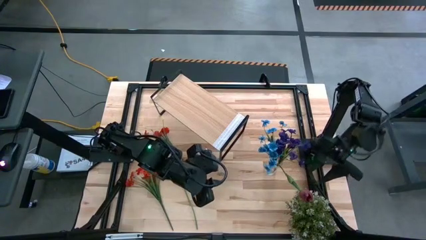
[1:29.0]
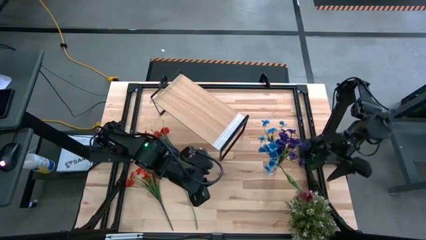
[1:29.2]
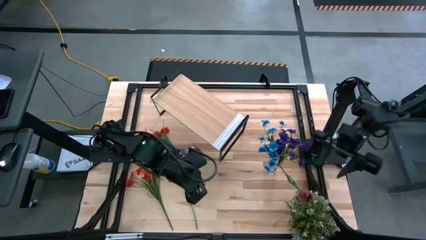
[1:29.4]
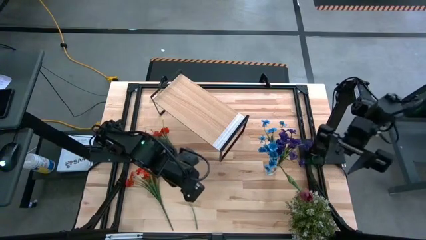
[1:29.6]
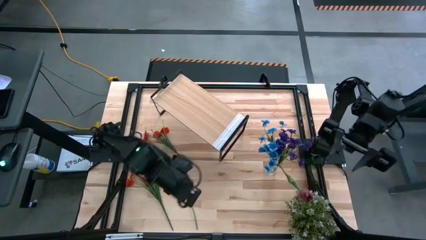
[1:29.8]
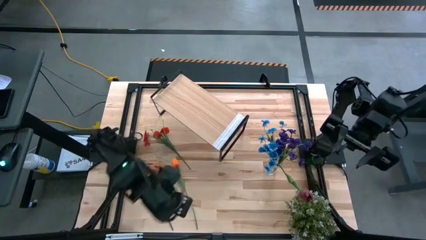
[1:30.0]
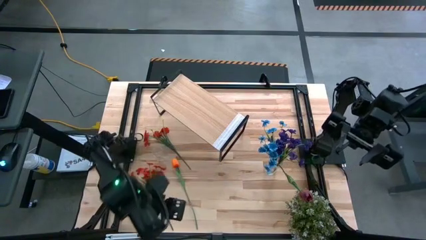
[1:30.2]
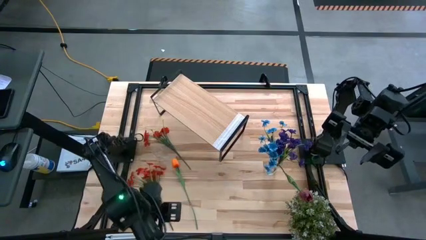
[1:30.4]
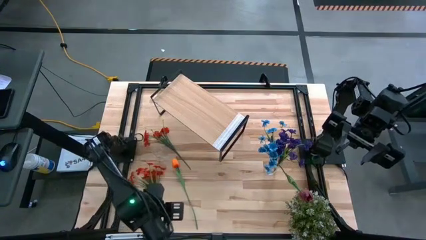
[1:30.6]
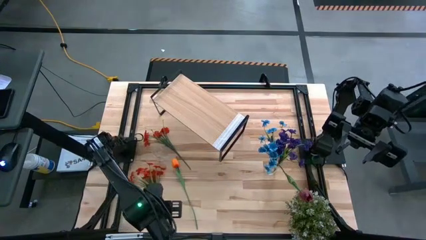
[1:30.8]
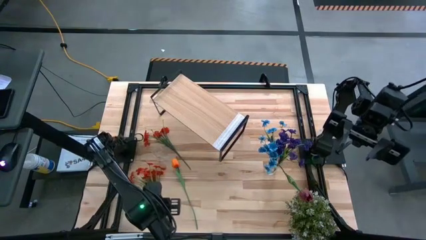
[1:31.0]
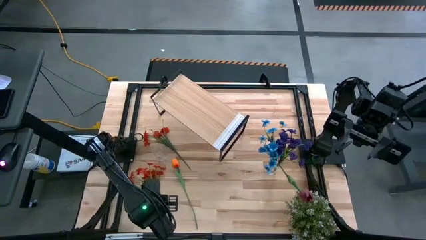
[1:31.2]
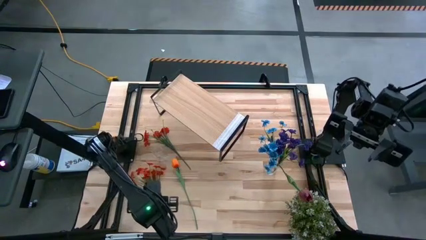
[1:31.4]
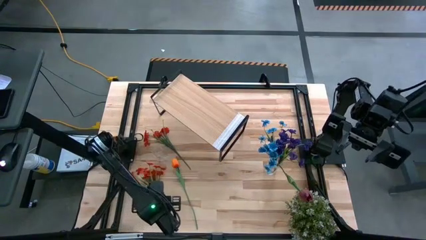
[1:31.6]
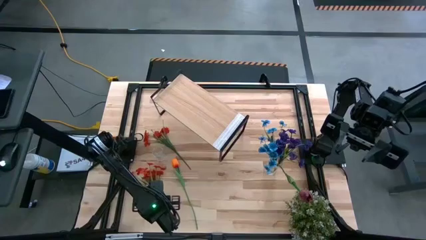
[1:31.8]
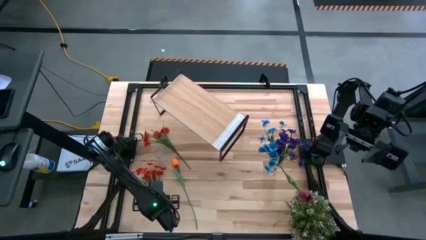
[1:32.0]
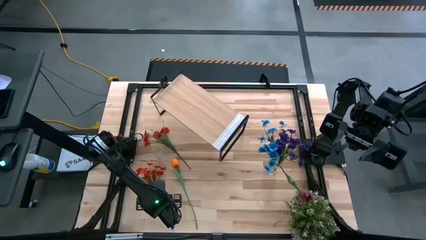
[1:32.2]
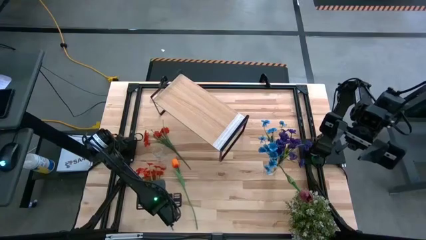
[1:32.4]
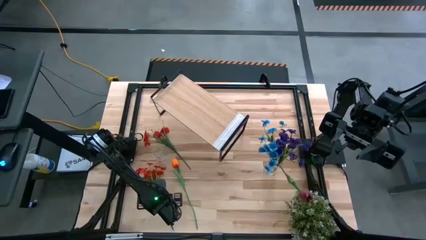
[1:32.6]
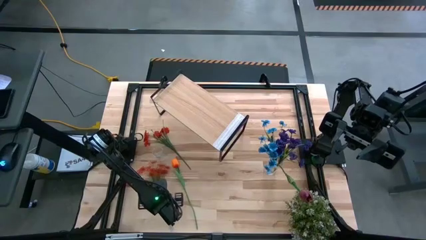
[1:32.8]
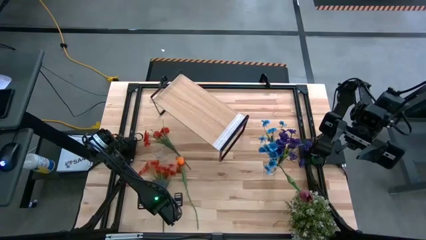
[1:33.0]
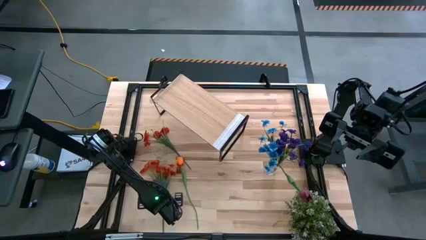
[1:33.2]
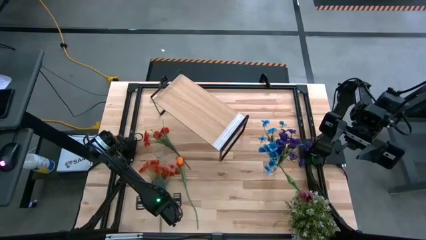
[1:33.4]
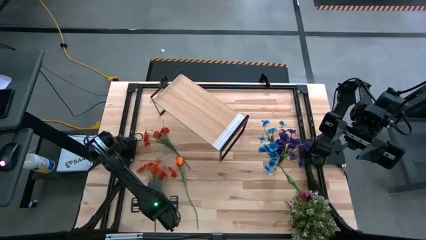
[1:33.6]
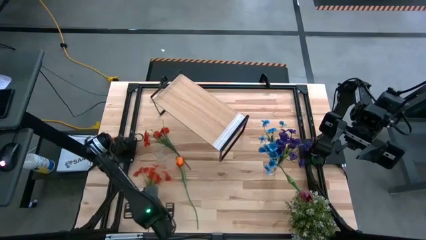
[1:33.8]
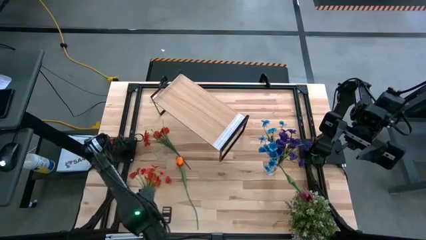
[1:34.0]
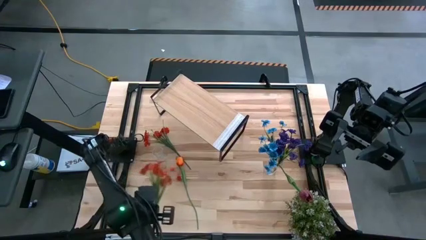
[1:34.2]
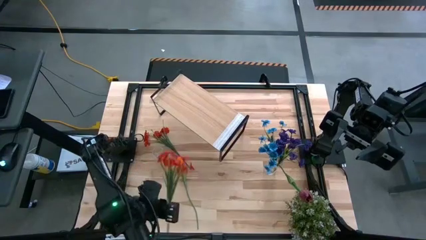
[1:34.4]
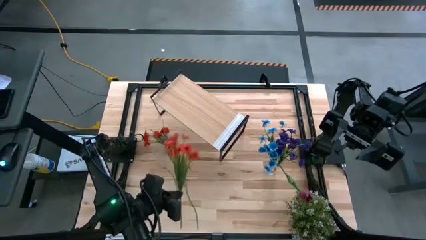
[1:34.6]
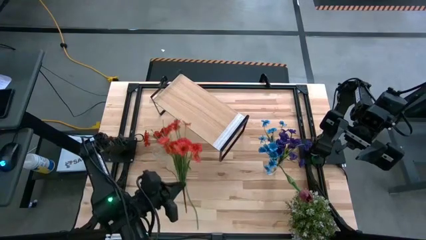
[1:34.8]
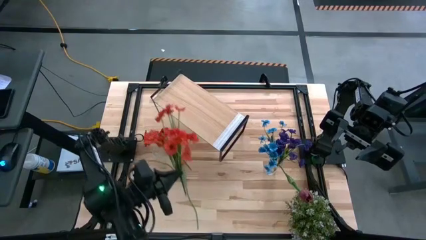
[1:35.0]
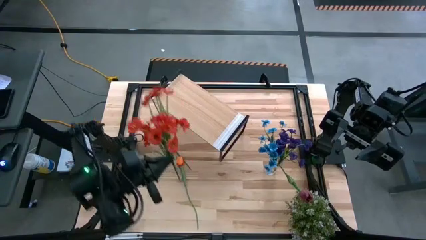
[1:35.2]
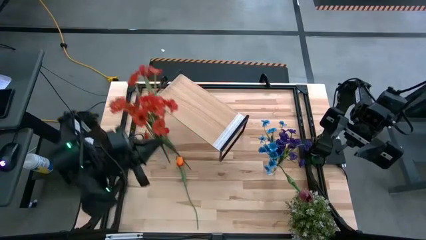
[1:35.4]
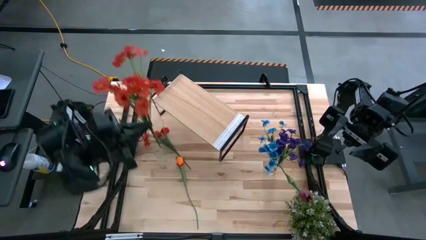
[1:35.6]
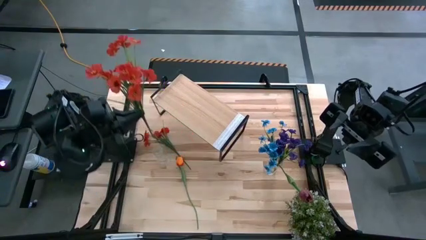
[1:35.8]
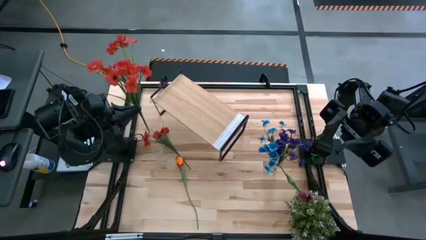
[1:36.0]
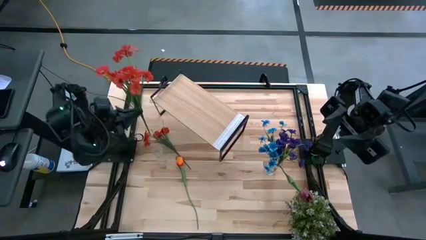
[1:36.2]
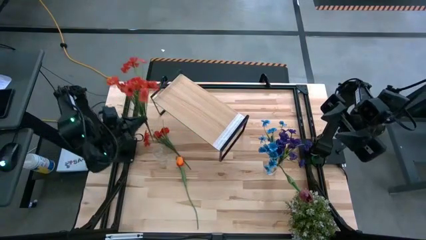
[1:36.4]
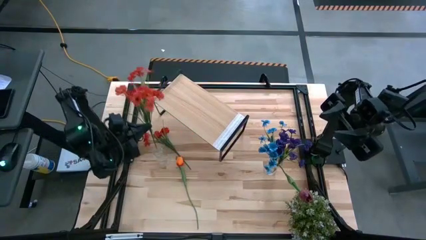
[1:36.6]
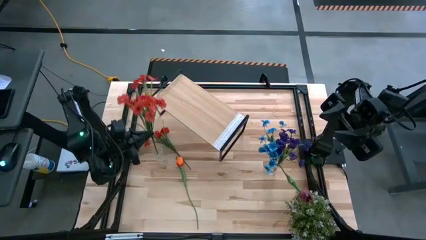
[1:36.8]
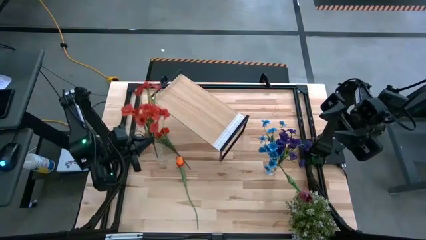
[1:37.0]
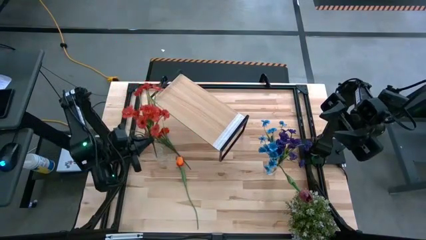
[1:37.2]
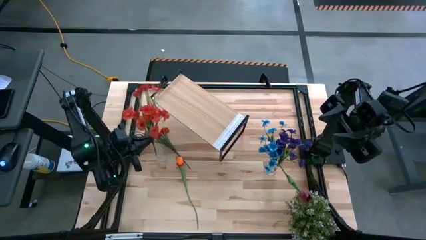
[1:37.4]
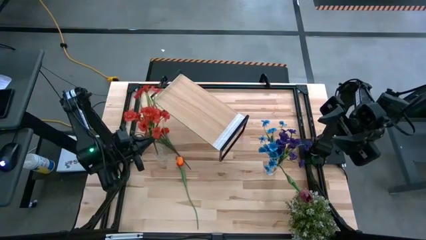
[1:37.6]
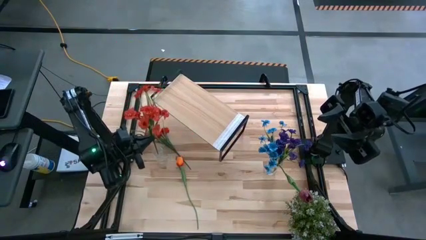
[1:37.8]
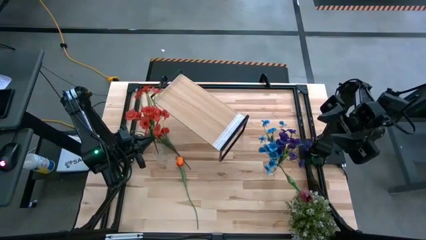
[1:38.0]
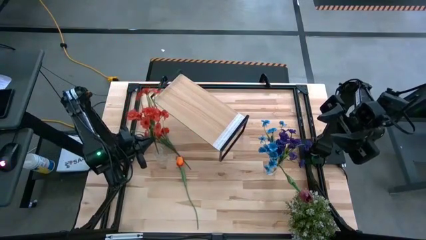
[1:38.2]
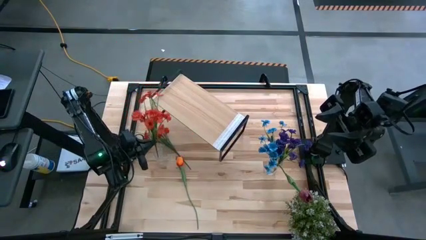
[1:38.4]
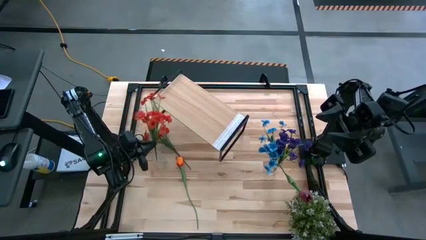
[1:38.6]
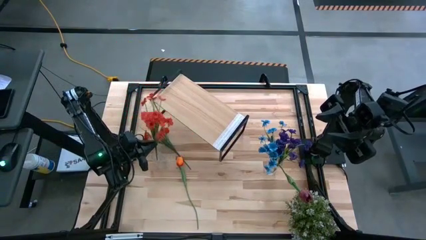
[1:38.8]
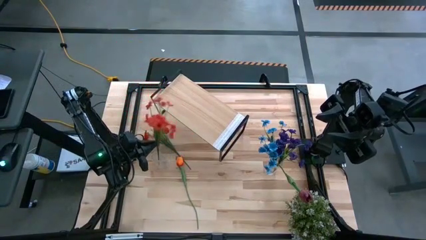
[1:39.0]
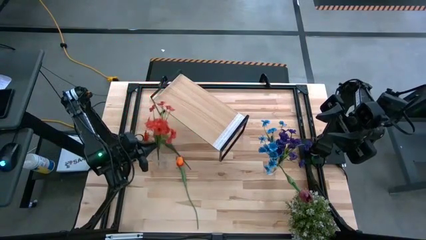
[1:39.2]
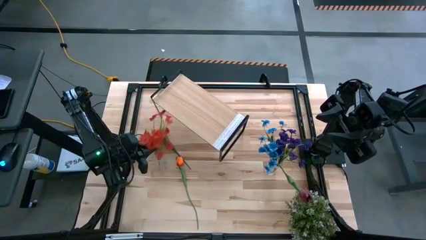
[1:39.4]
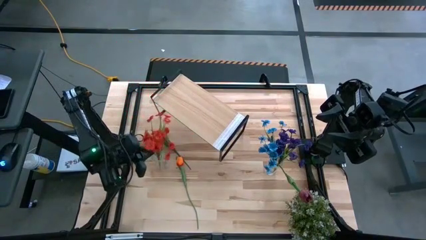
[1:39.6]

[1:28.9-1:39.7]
Task: Pick and place flowers into a vace then onto a shelf
Put the bottom red flower into the left transparent vase

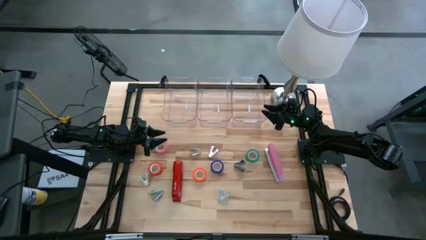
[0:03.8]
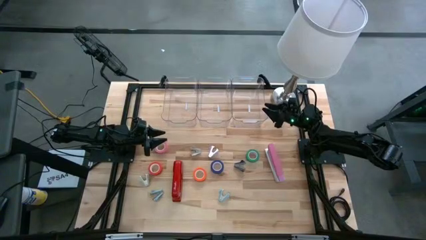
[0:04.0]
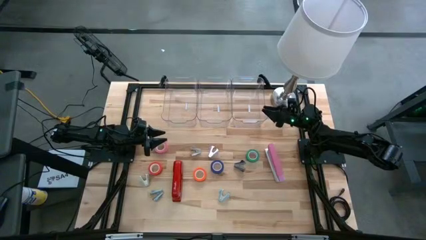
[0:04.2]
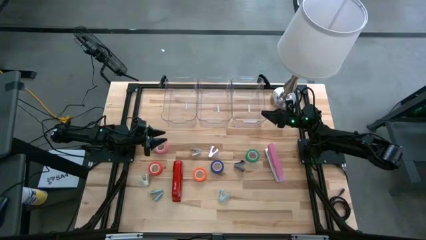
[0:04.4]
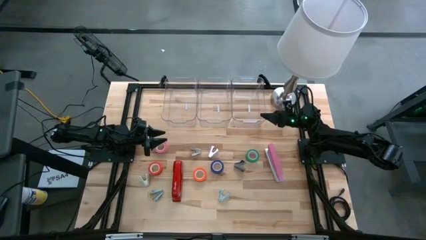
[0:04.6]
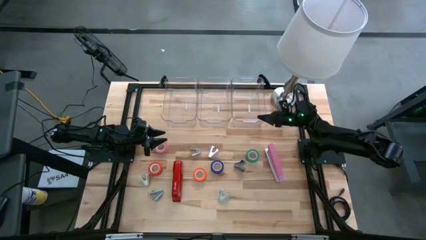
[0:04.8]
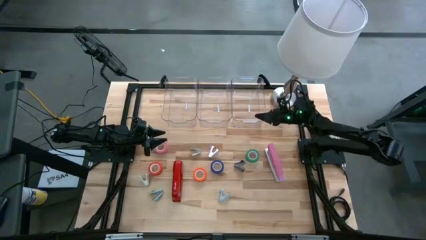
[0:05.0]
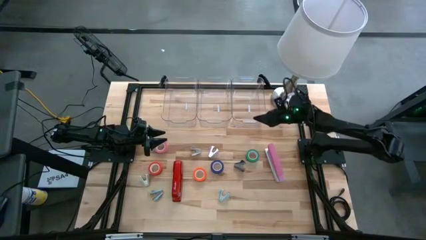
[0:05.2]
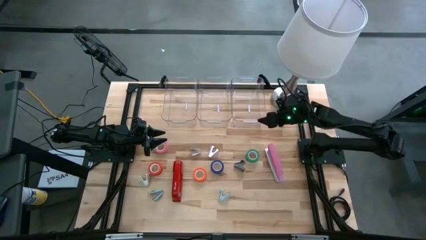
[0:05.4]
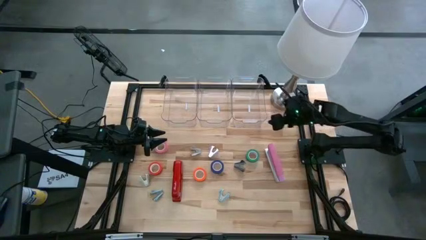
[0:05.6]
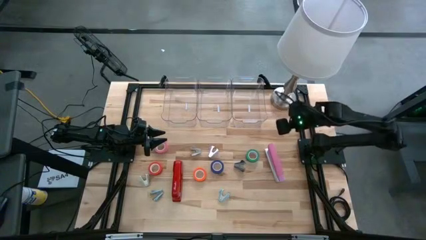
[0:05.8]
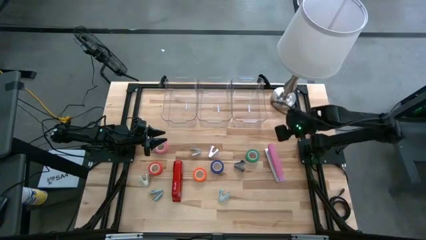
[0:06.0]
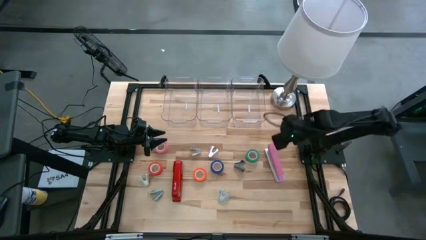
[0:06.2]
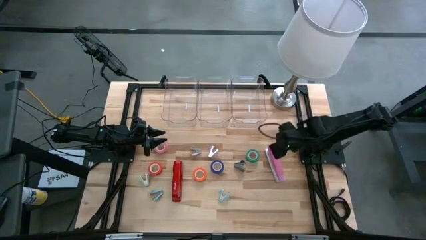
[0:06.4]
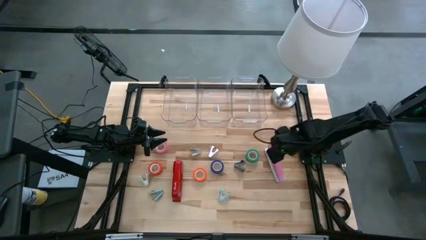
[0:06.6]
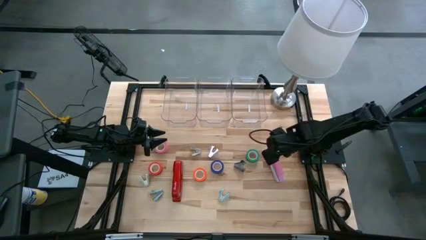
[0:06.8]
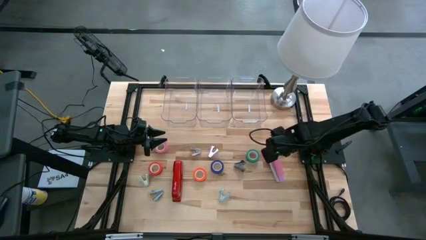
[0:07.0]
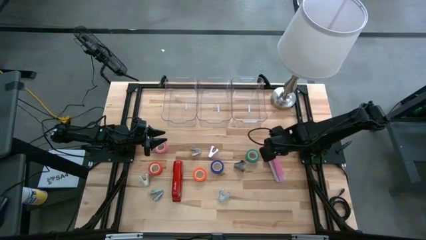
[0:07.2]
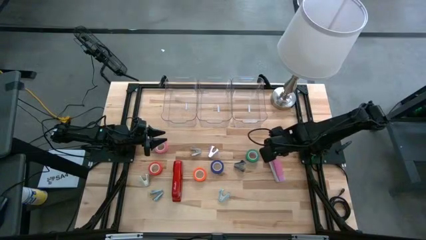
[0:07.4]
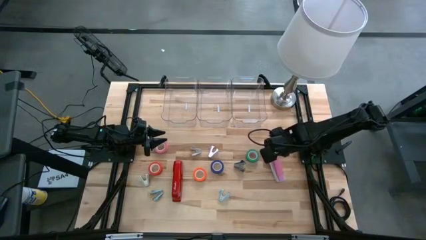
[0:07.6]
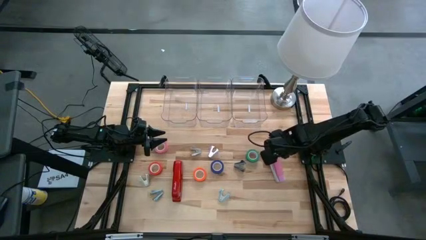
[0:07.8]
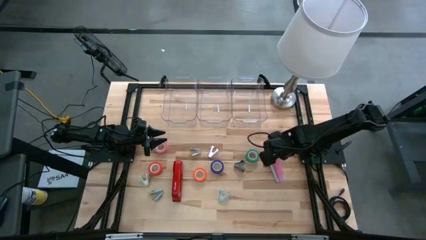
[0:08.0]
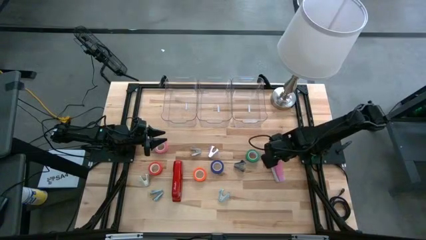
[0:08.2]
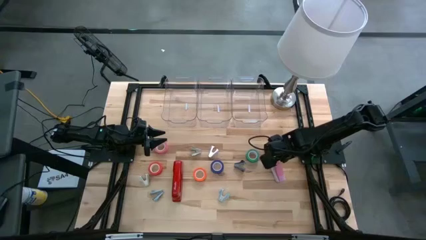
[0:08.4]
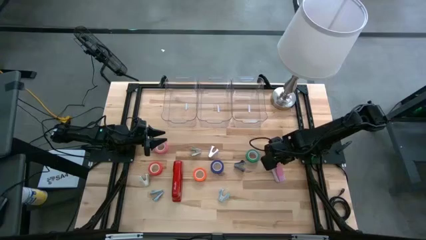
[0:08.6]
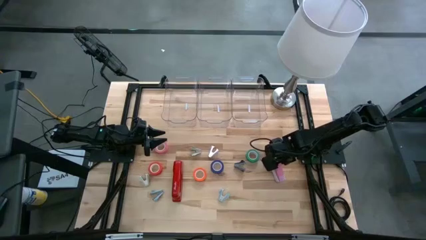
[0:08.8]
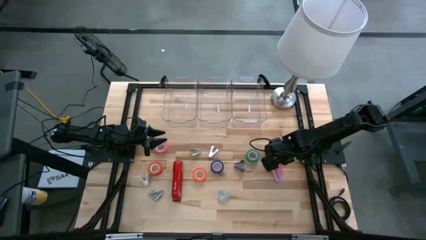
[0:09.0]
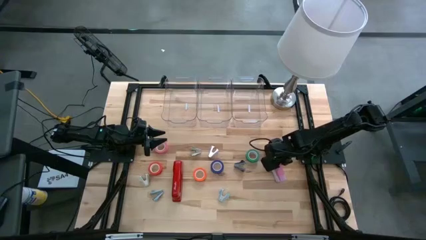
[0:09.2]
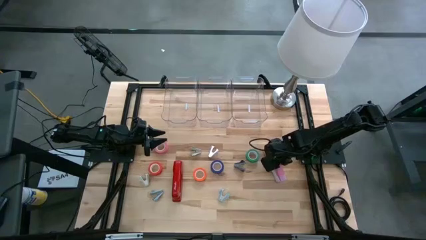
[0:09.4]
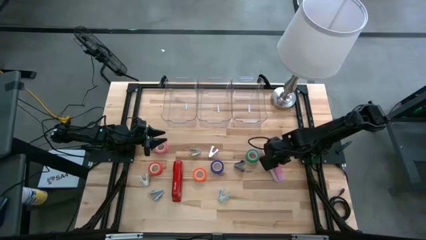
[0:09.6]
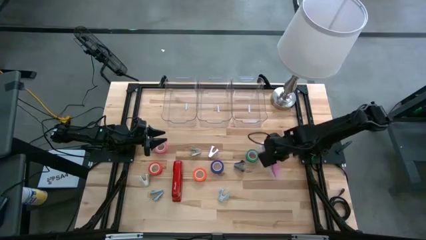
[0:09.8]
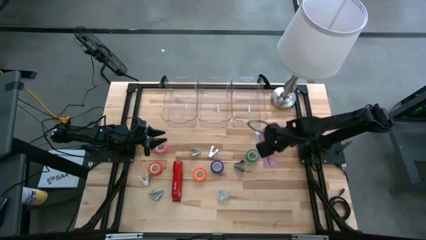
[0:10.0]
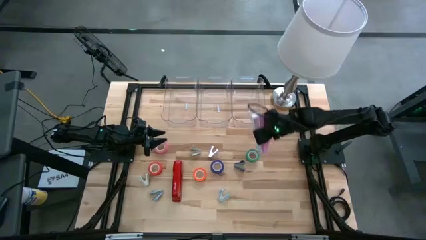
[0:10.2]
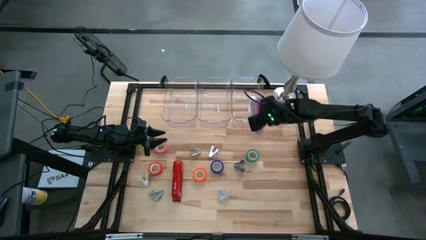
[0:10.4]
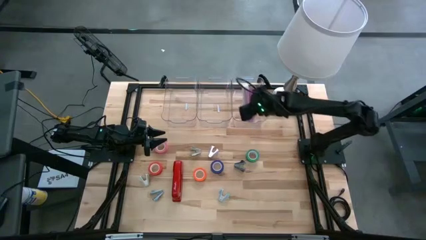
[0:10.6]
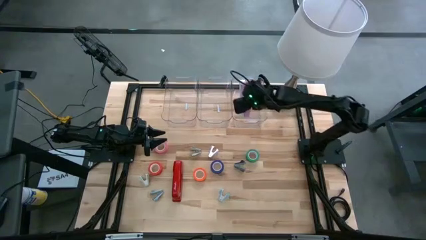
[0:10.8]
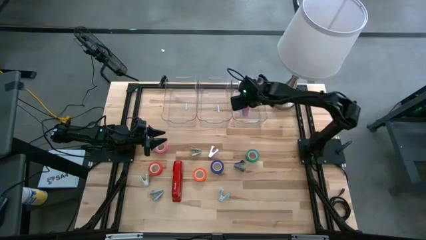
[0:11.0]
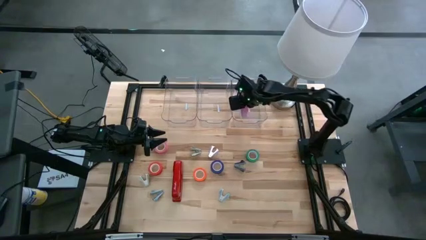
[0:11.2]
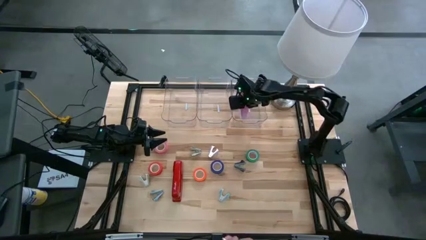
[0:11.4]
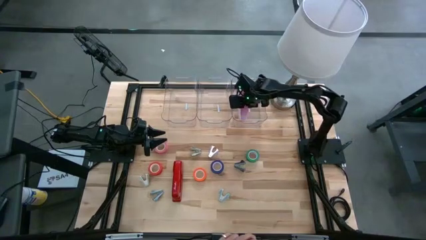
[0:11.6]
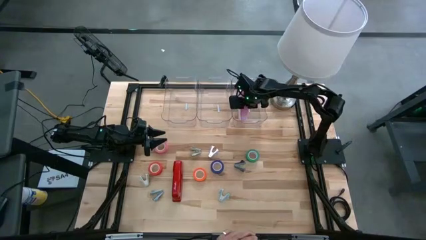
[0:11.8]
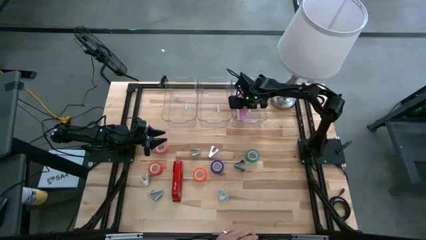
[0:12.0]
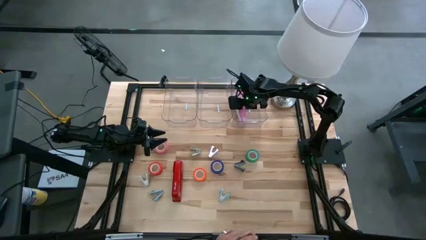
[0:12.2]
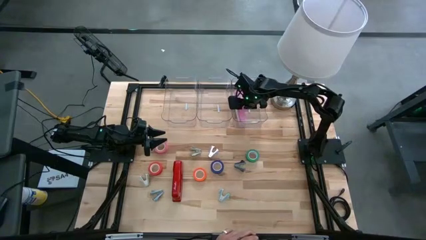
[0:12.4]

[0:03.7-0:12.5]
Task: Pick and place Stapler, Stapler remover, tape
Put the pink stapler into the right transparent bin
